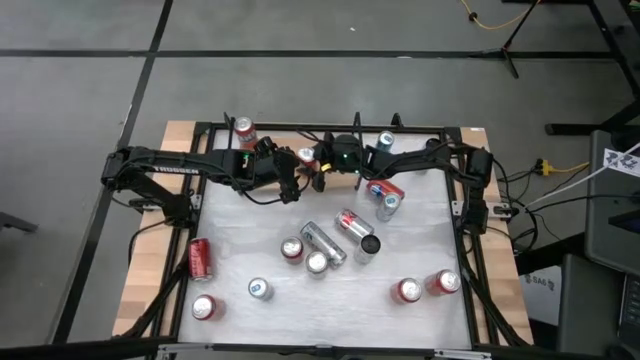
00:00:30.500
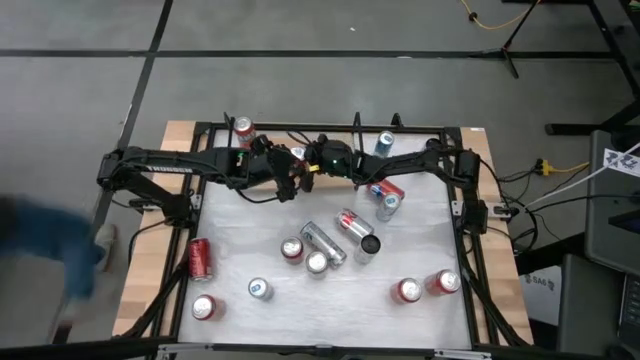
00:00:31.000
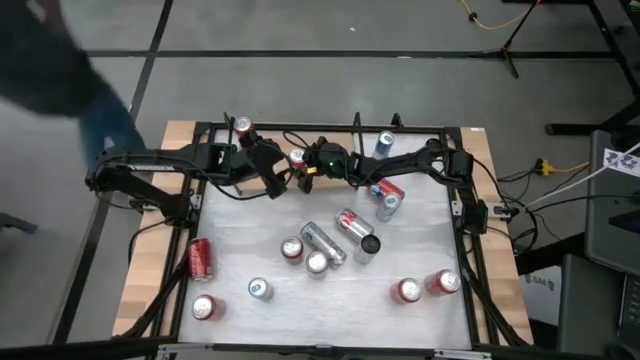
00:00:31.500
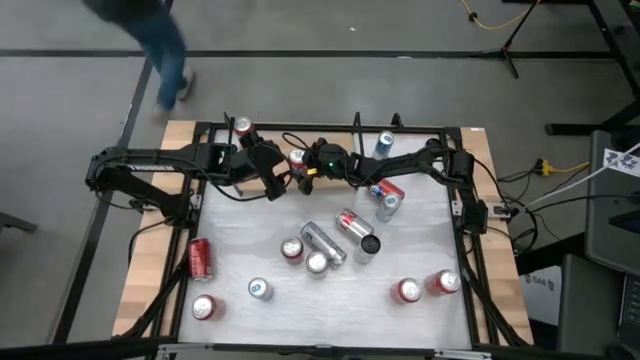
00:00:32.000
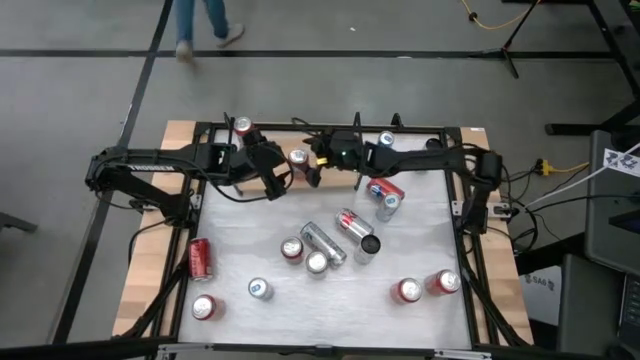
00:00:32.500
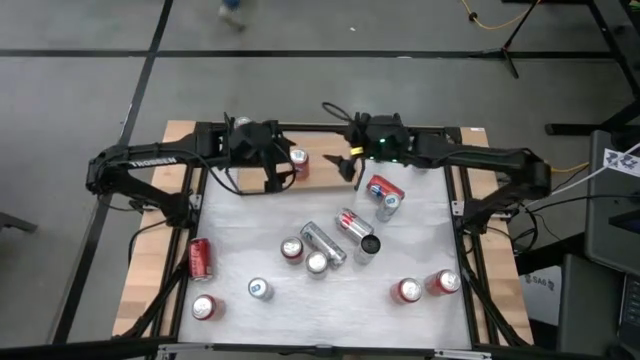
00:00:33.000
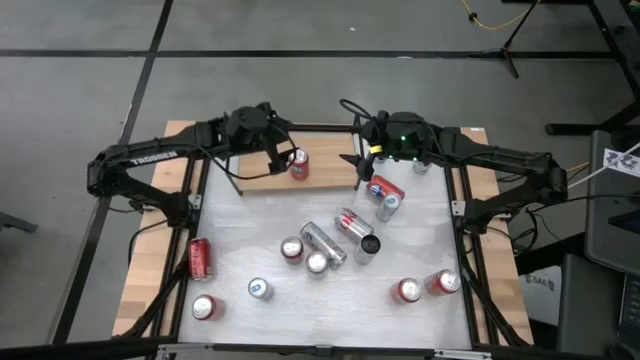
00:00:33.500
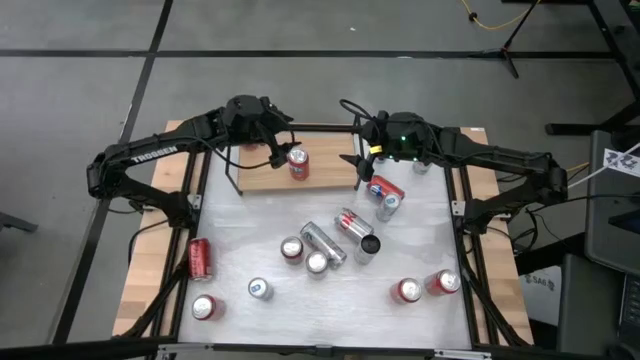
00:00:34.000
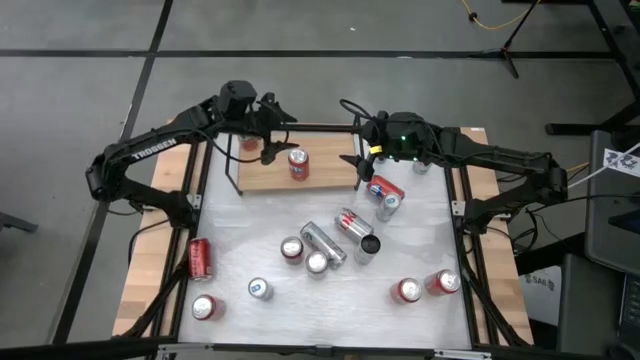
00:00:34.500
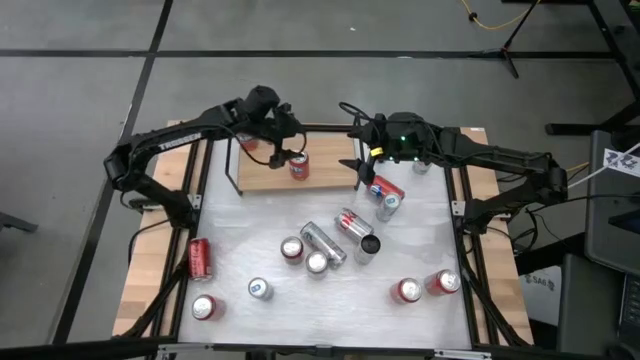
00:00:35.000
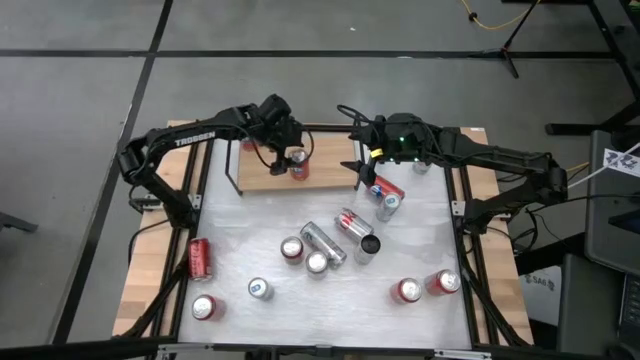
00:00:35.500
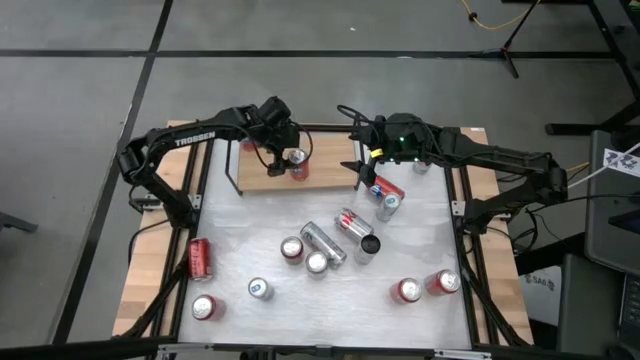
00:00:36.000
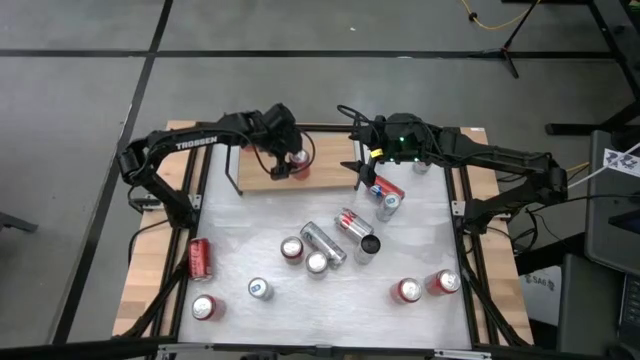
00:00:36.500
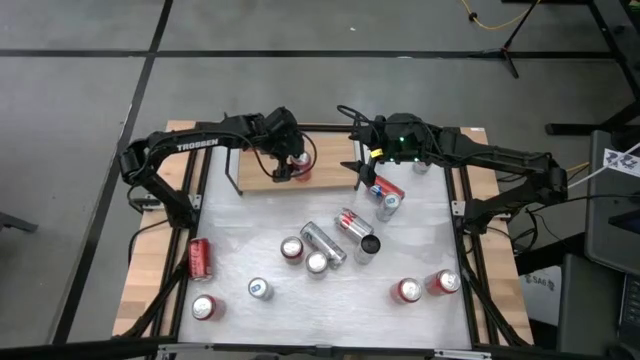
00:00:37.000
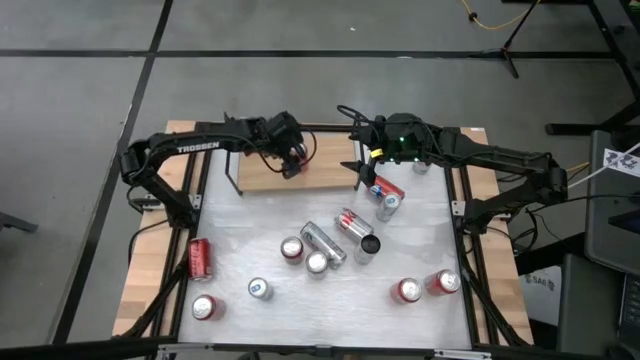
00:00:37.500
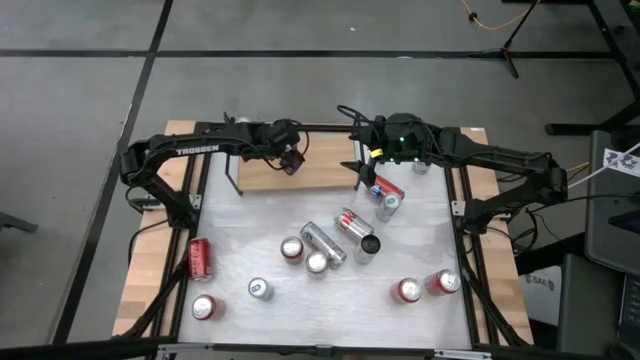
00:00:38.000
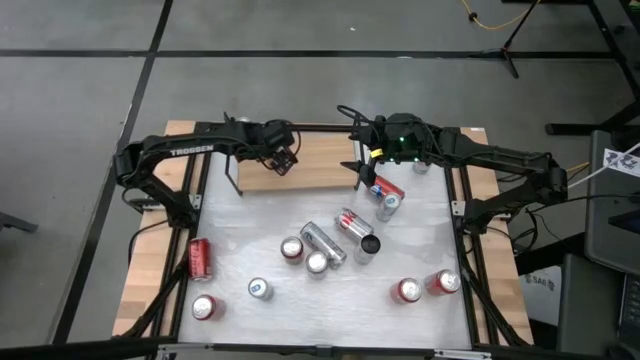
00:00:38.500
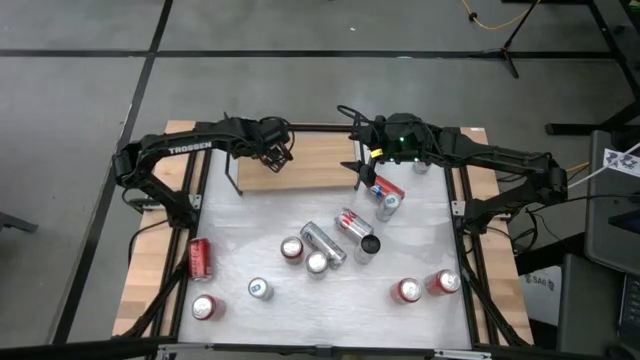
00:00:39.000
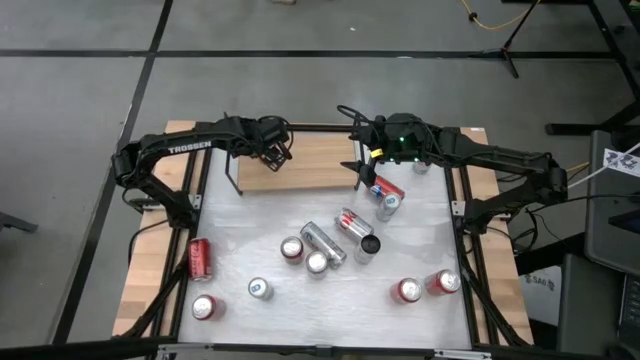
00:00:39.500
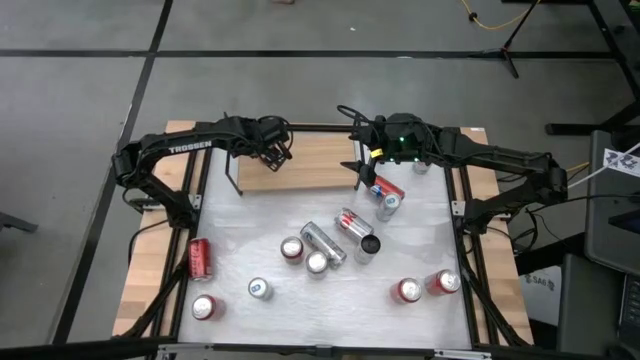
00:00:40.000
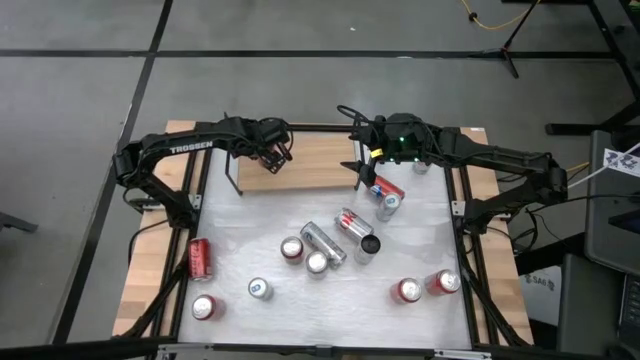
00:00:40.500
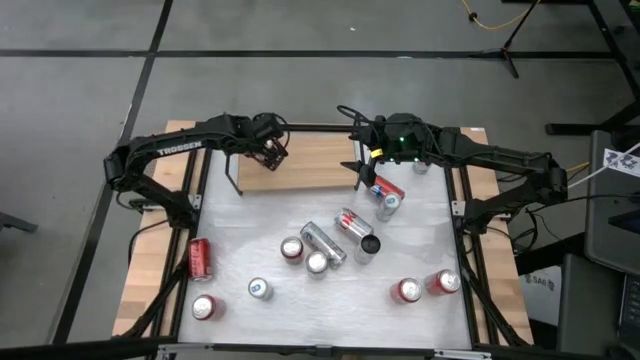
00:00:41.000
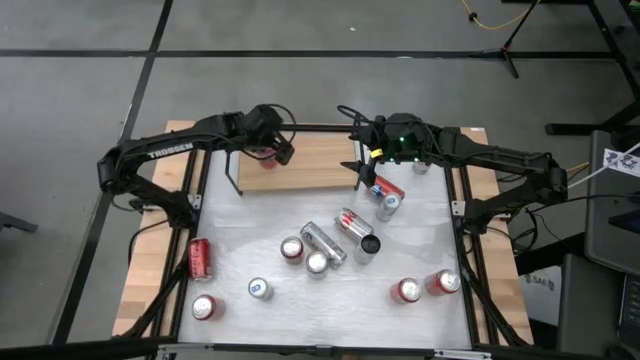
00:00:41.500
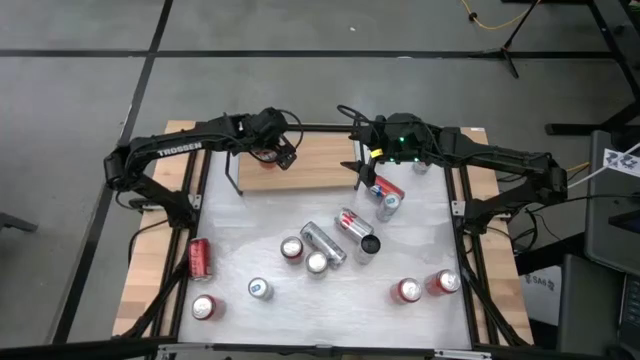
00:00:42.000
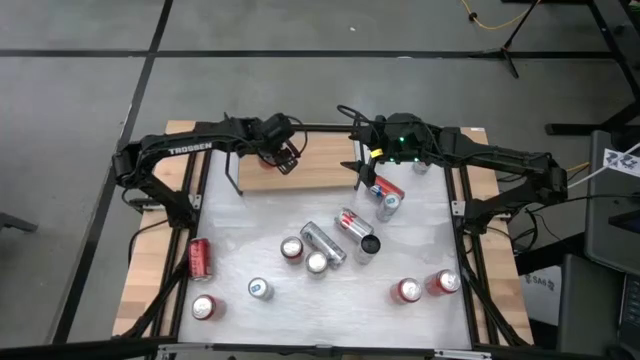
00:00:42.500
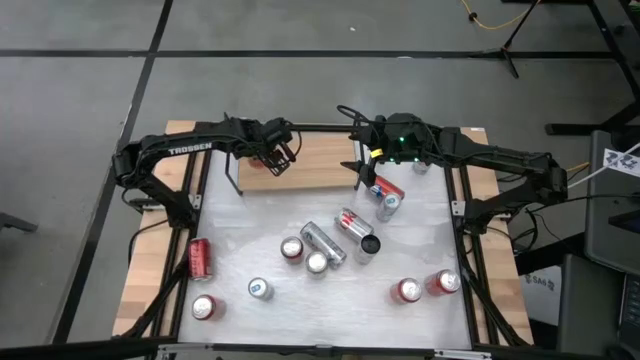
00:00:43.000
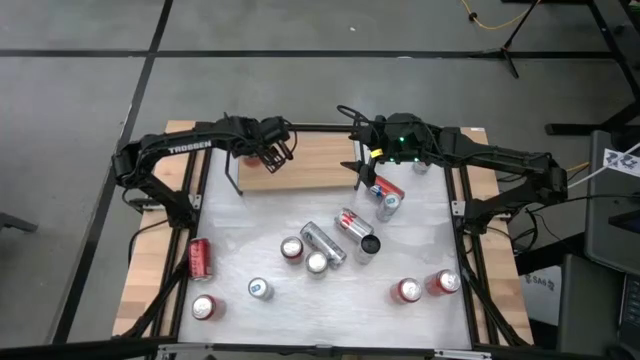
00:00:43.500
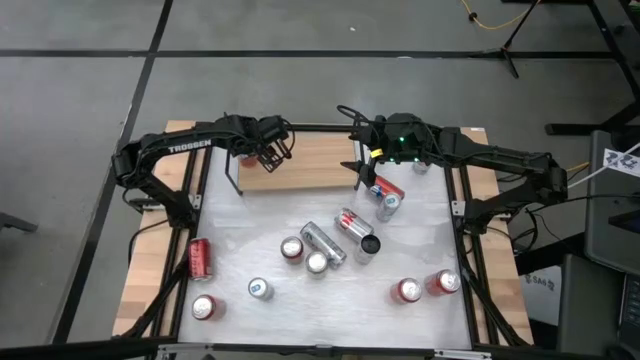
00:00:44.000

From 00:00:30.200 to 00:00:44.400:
Task: Place canned beverage on shelf
Put the red soda can on the shelf aligned with the other red soda can

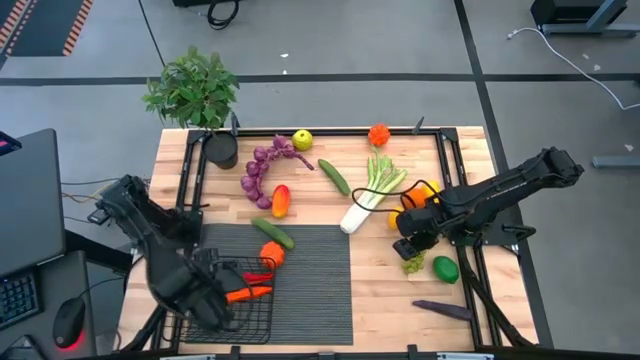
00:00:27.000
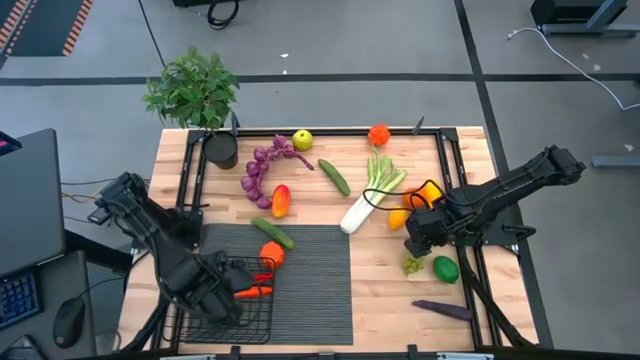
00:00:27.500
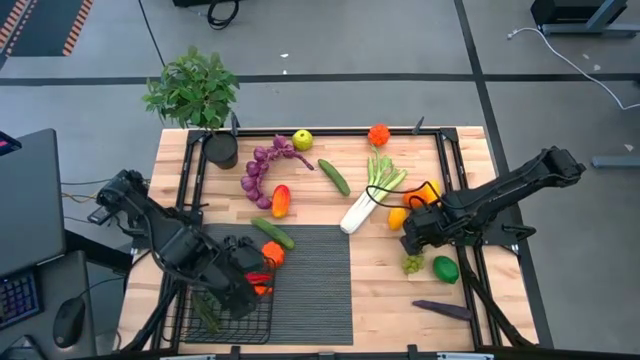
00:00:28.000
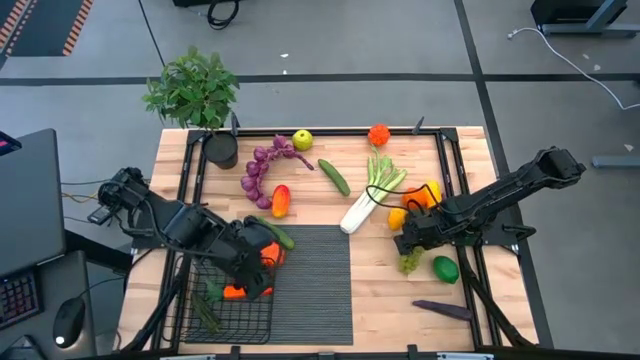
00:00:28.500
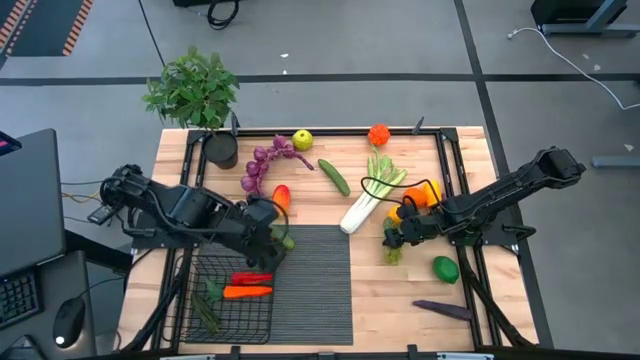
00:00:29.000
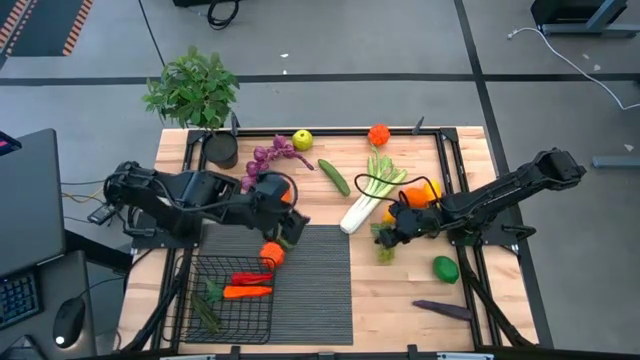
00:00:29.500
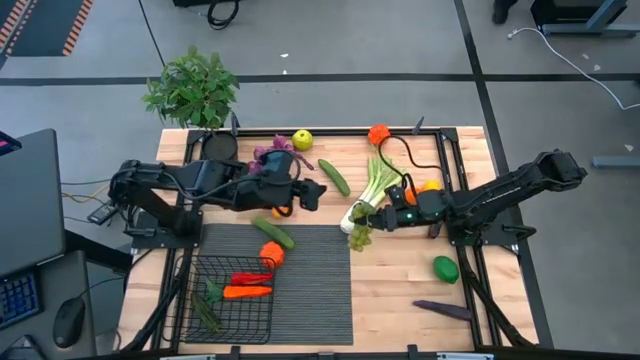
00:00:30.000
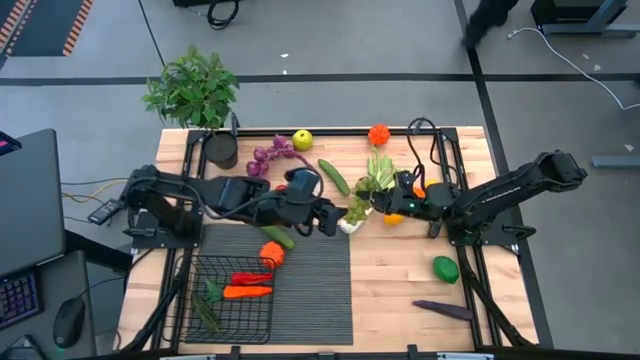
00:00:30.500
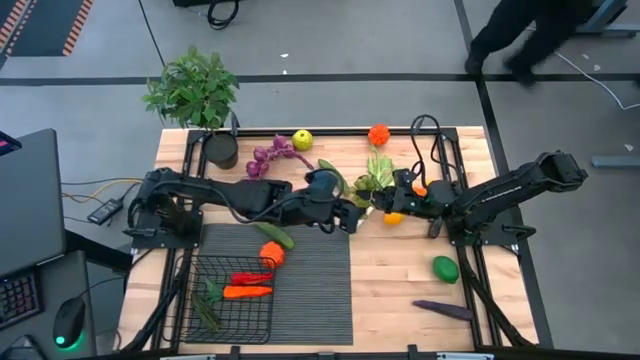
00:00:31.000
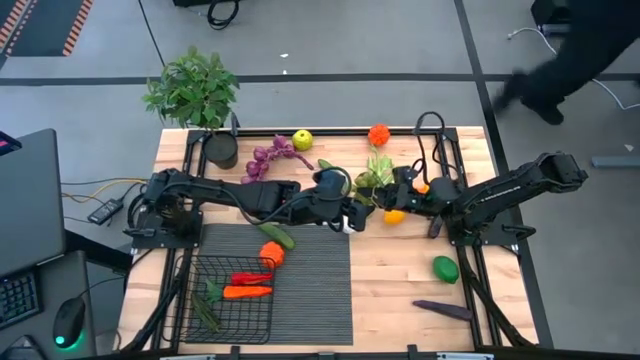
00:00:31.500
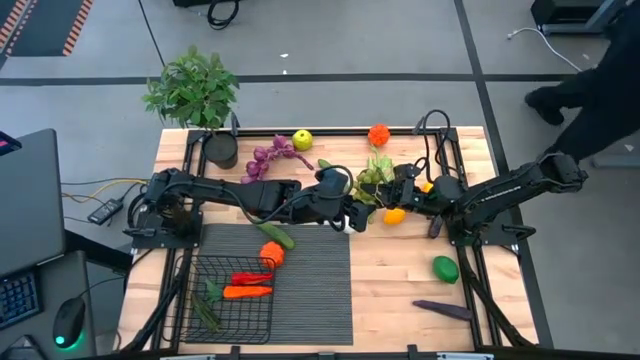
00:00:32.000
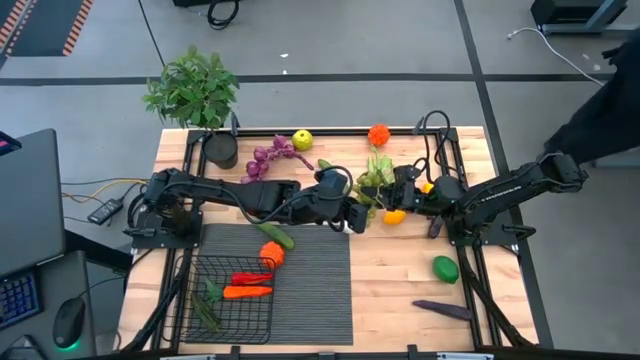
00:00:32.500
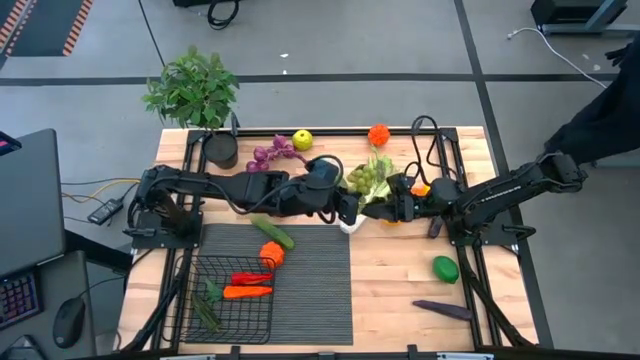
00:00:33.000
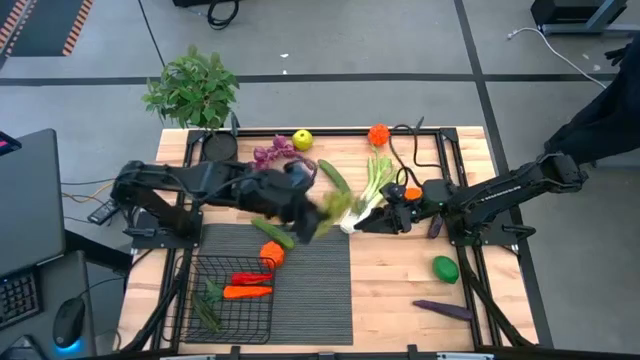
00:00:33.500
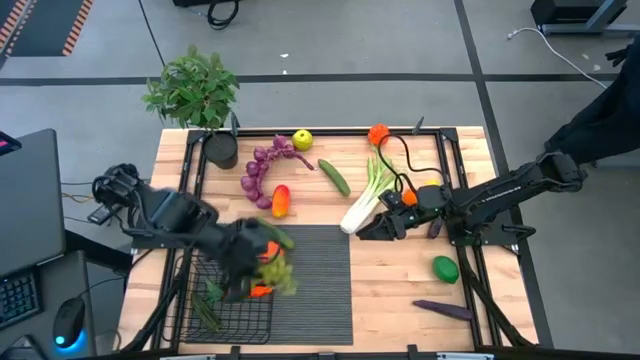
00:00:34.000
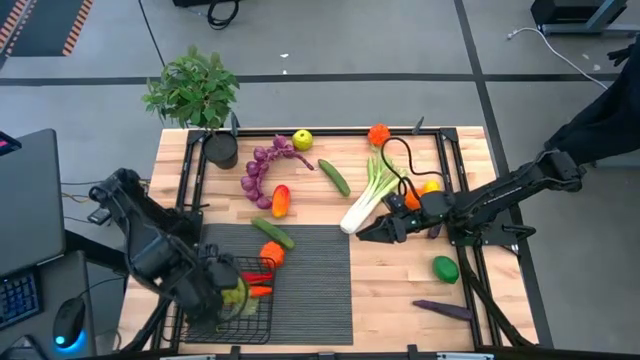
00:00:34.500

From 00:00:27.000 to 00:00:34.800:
Task: Build produce basket
Put the green grapes into the wire basket
